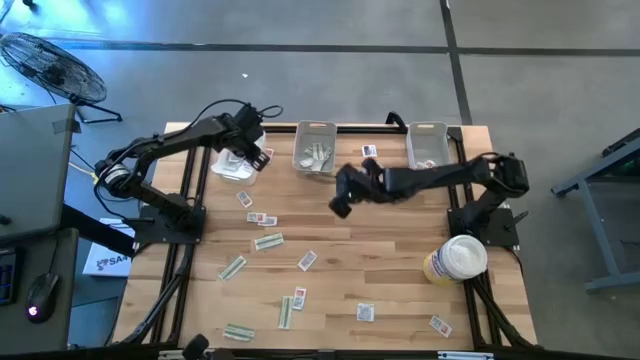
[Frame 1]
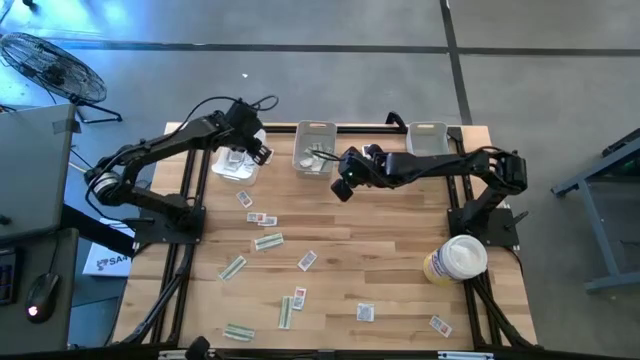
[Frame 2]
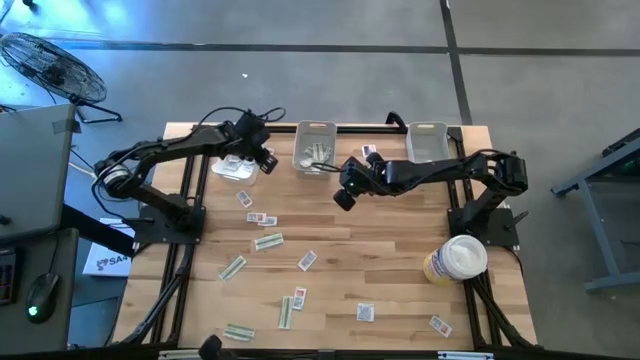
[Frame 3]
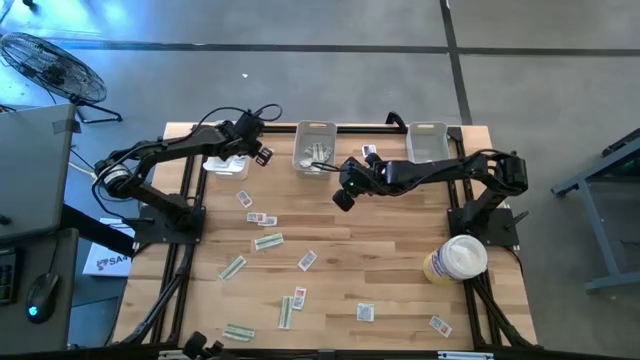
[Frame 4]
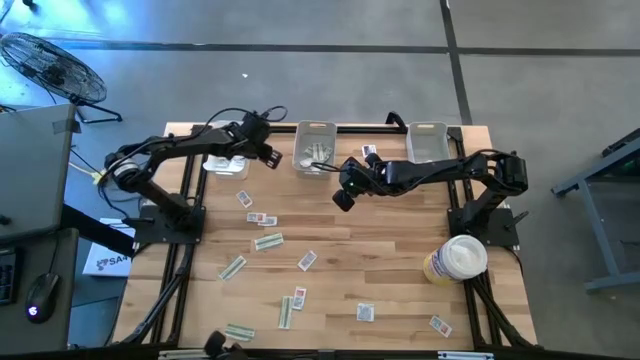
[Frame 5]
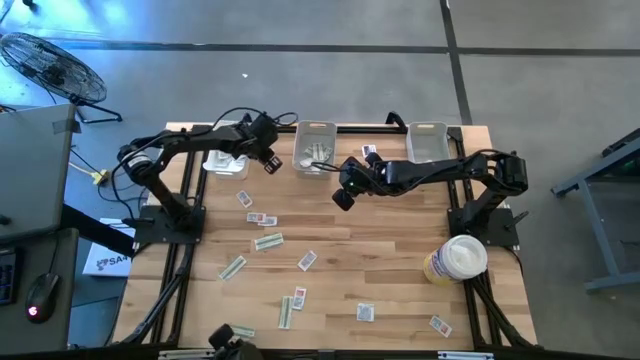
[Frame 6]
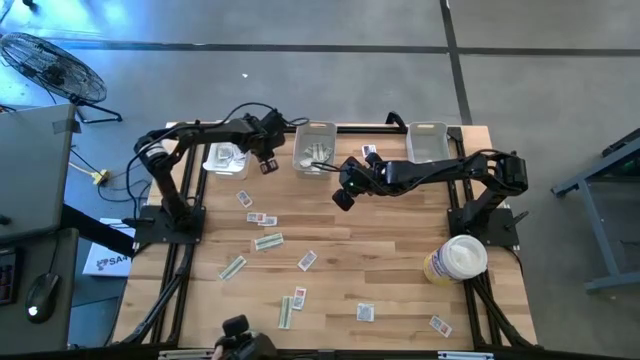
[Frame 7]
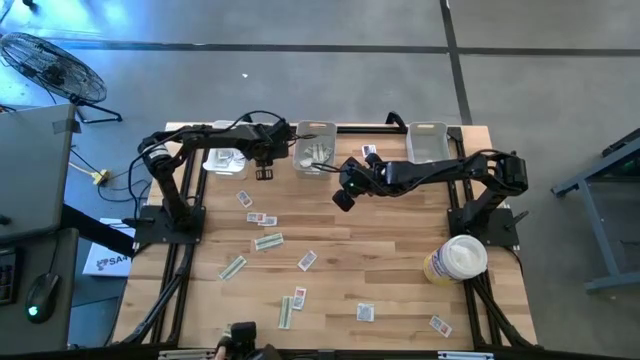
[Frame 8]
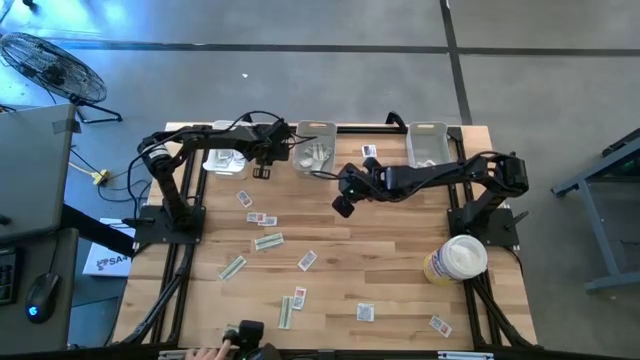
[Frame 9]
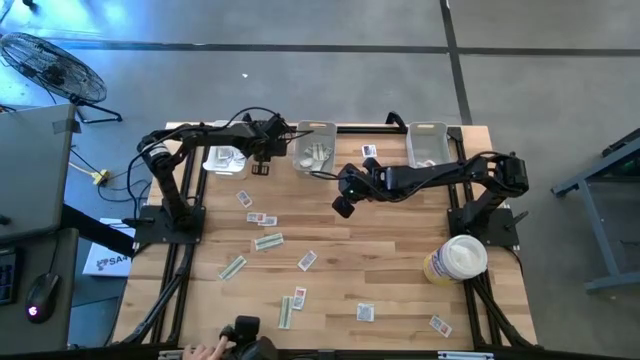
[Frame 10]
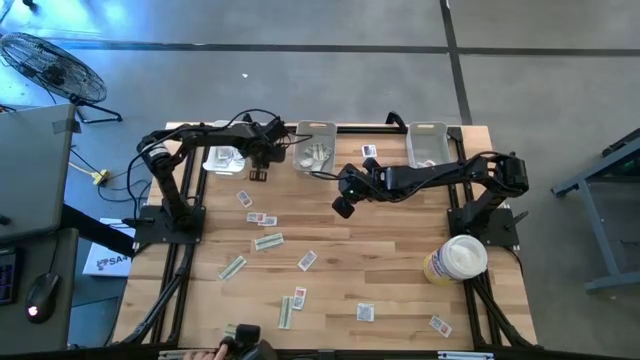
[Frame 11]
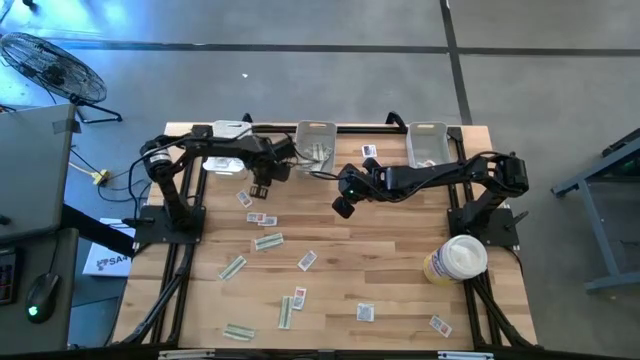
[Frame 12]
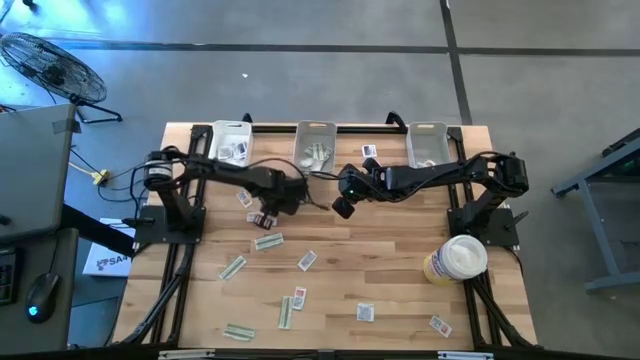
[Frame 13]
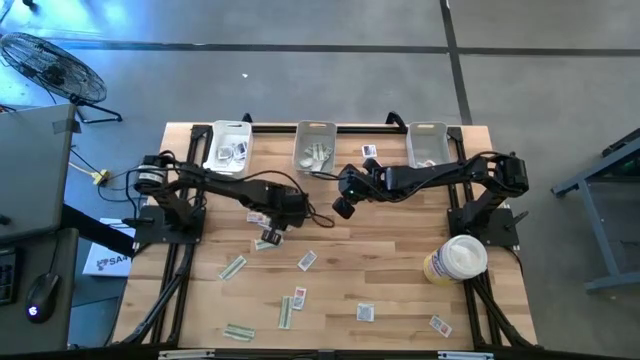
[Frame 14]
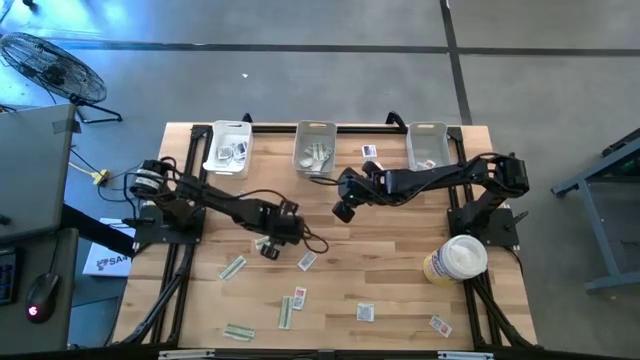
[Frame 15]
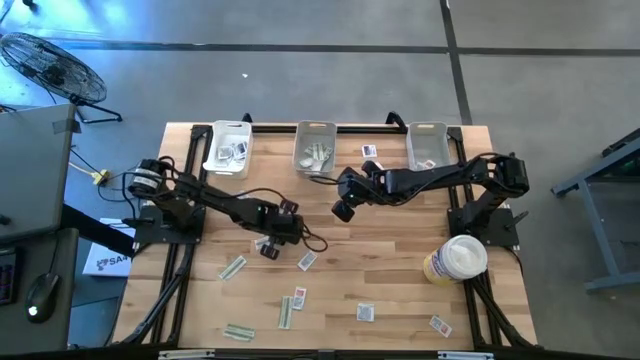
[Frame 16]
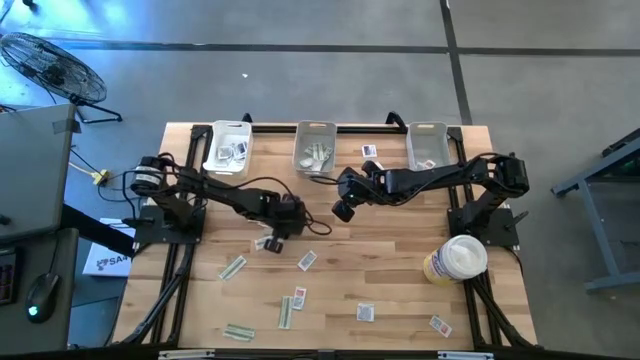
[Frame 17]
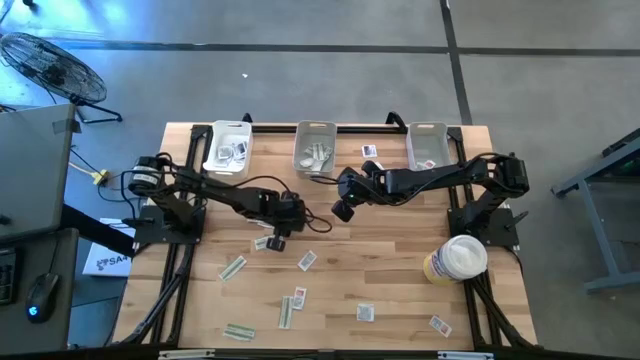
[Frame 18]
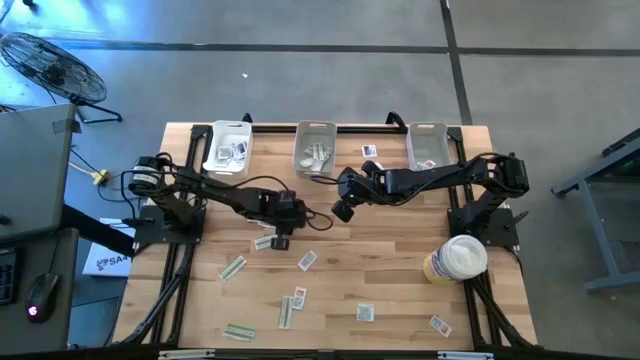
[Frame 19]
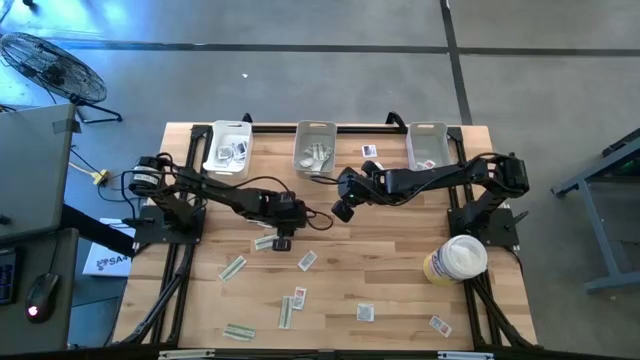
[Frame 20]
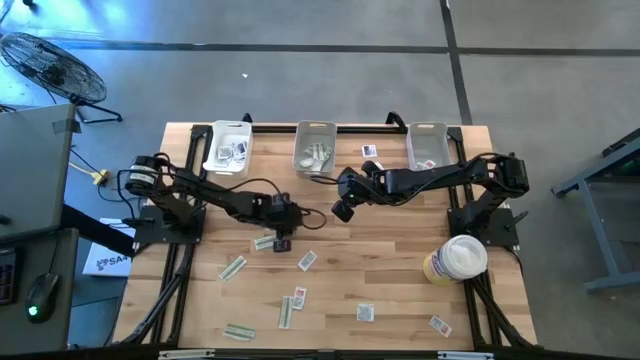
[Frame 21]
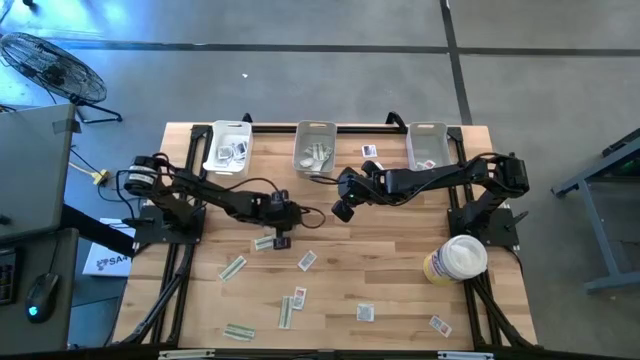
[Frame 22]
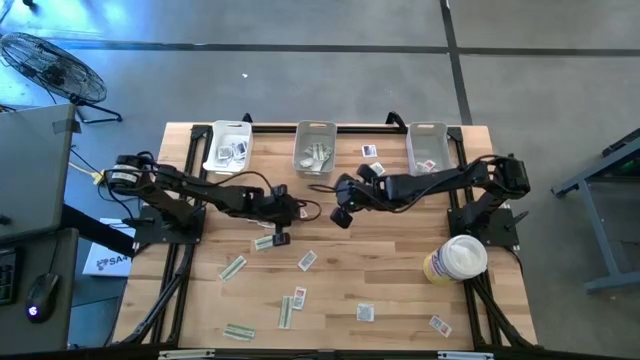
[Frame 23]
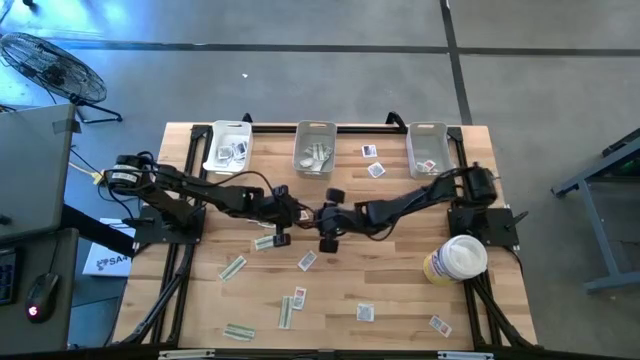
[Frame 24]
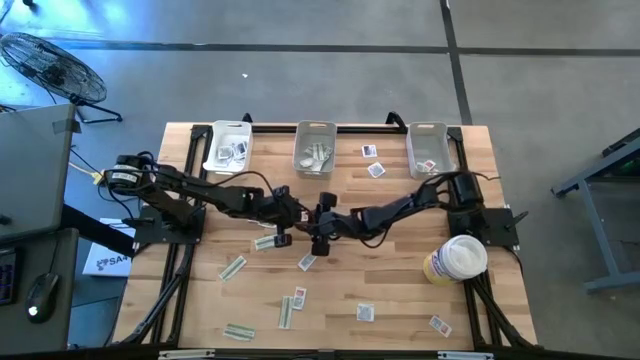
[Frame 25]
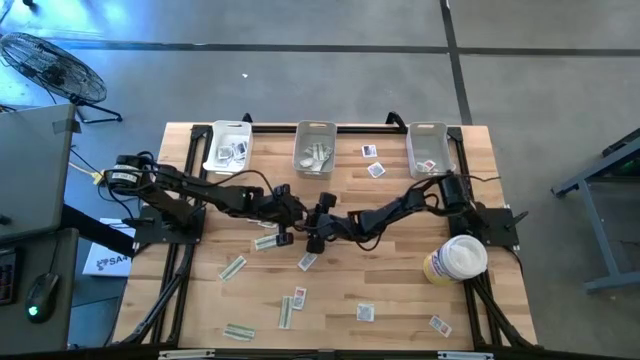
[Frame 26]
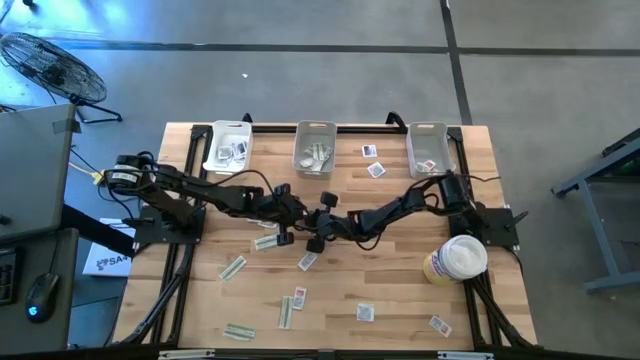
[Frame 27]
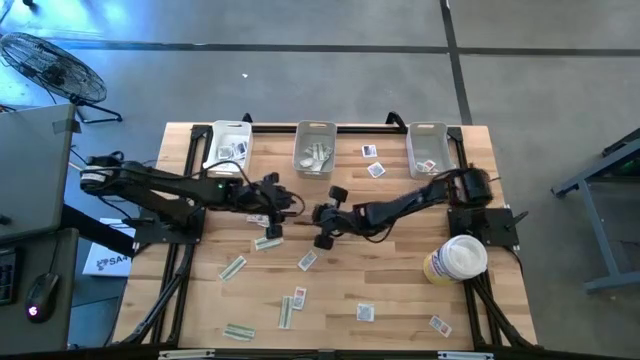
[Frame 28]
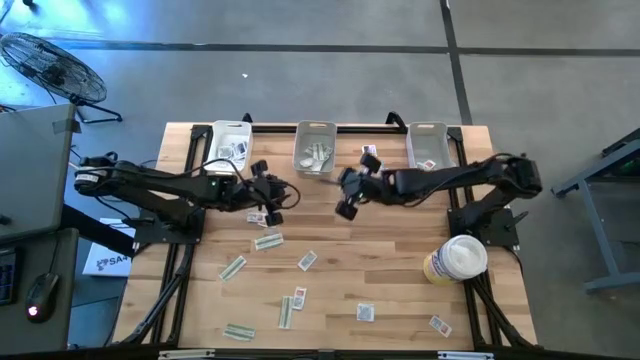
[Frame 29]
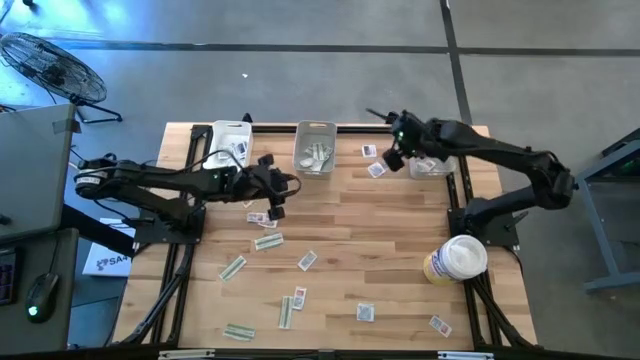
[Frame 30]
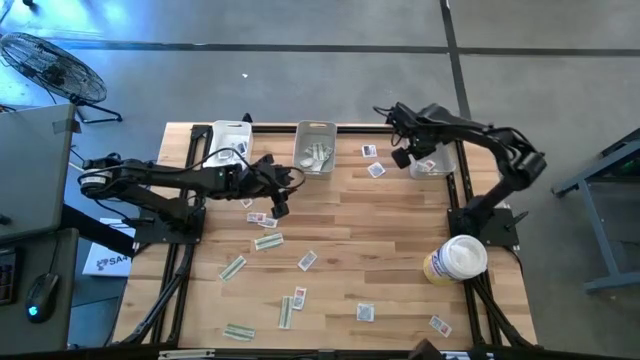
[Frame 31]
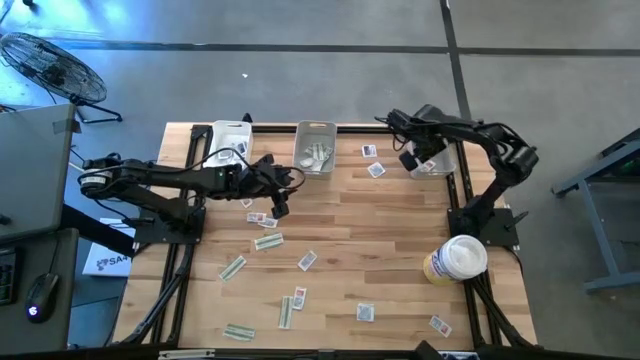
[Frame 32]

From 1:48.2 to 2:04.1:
Task: Pick & Place First Aid Supplies
Put the orange pad into the right gray bin

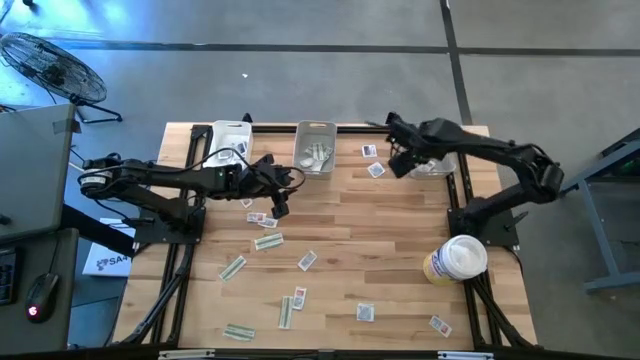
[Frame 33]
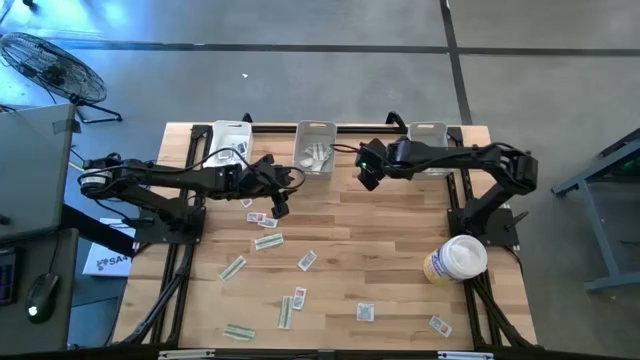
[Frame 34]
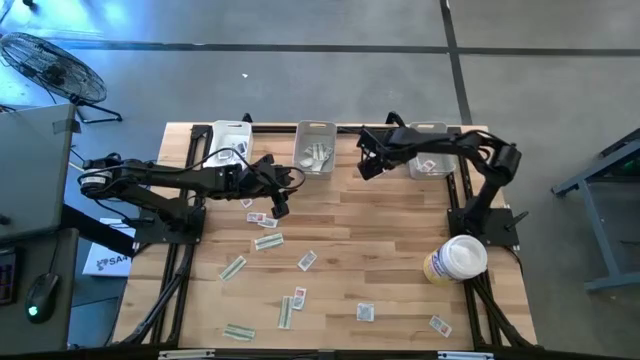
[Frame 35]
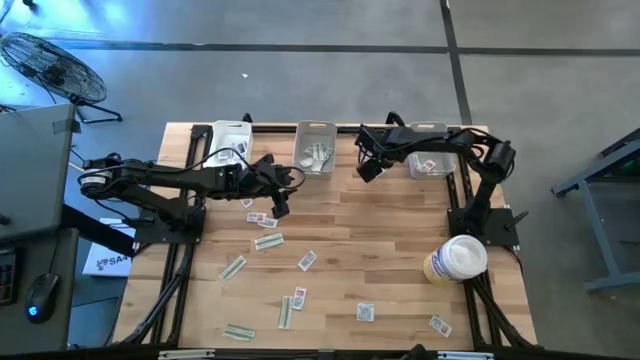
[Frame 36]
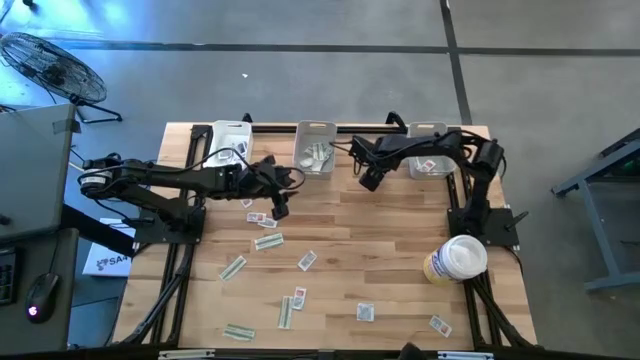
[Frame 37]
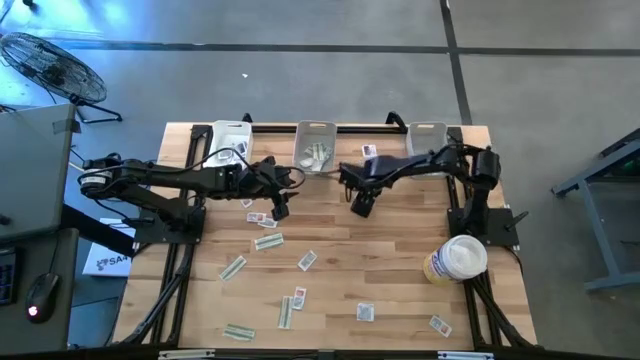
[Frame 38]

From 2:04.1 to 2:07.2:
Move the blue pad to the center of the table

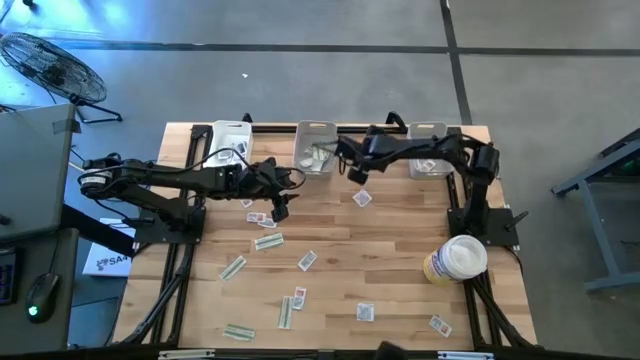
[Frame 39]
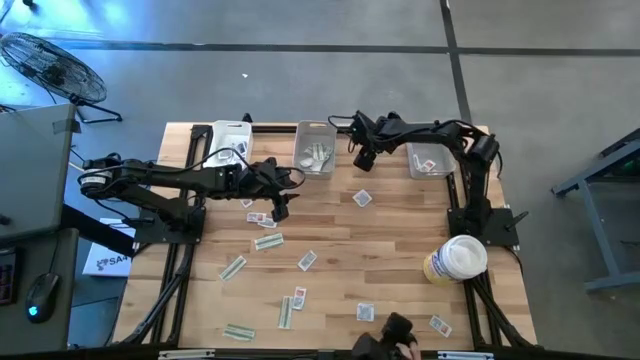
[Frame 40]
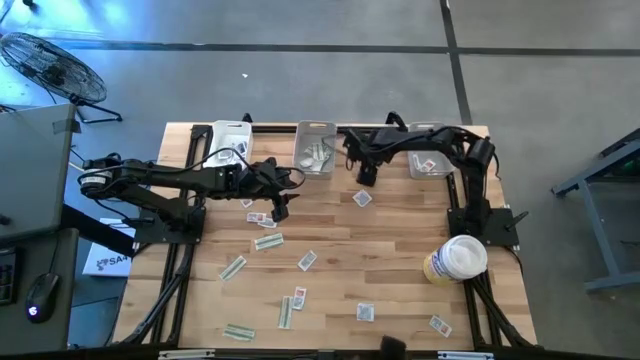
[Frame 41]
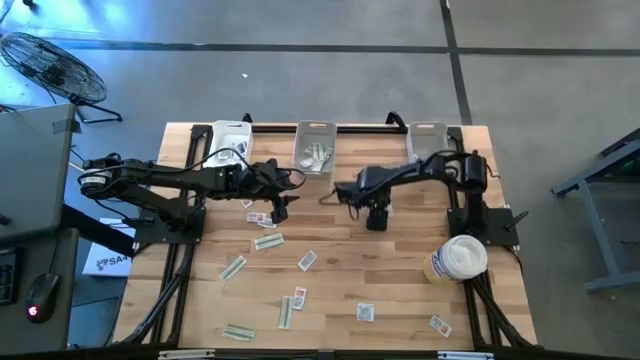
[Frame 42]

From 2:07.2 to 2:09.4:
Move the blue pad to the center of the table

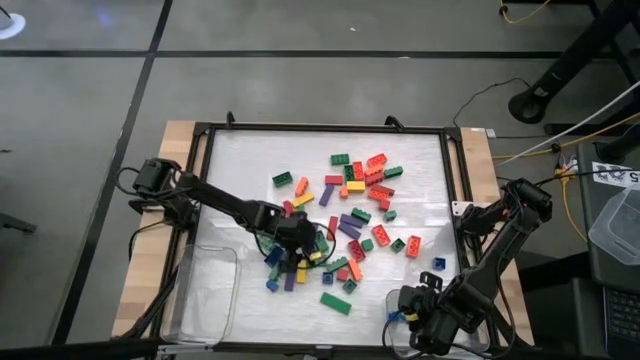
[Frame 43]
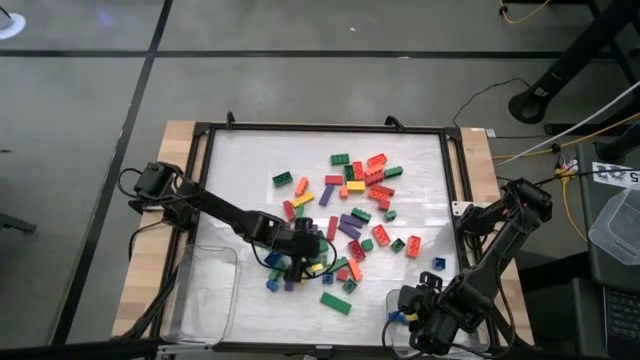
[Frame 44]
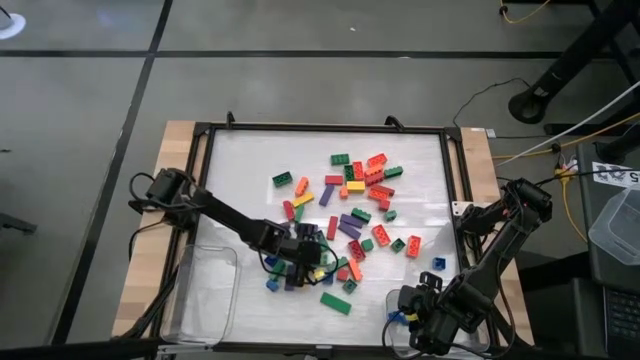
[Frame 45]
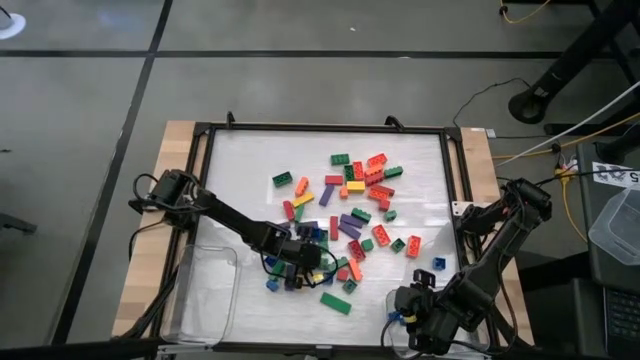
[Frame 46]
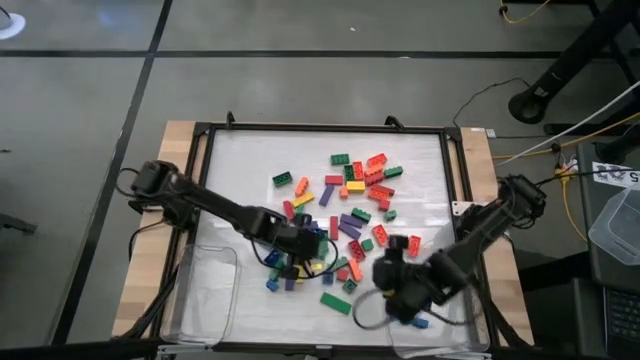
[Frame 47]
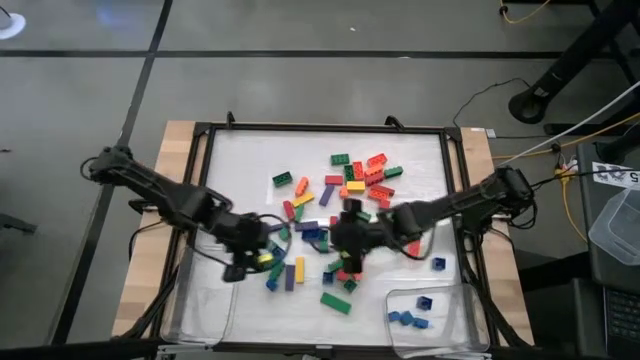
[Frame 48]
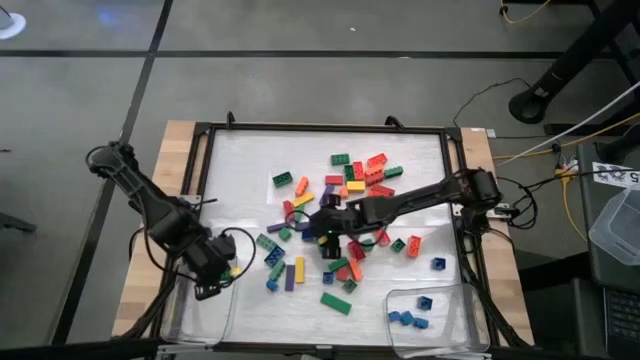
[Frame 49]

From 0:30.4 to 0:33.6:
Task: Sort blocks by size
Put the large green game piece into the left transparent bin
